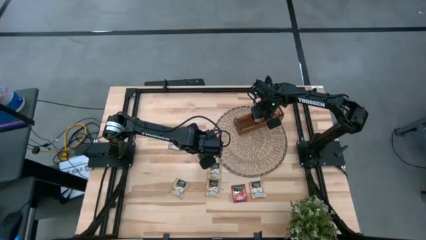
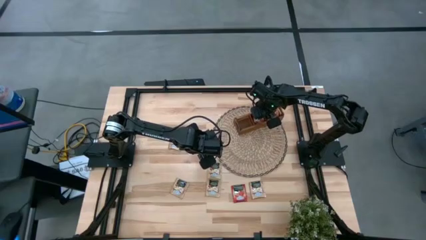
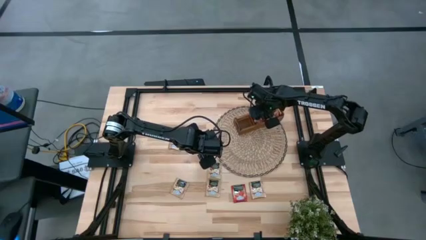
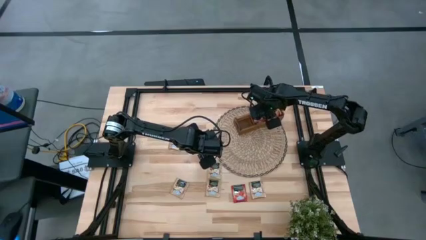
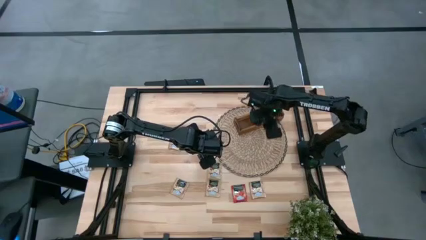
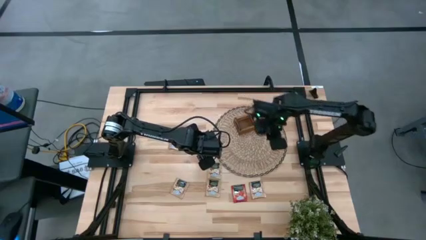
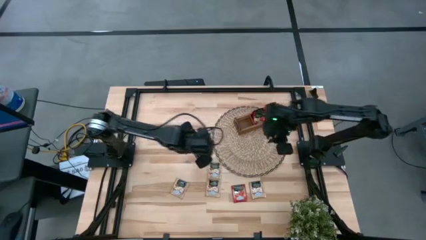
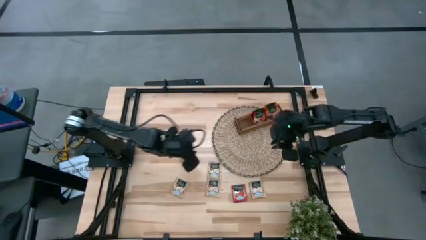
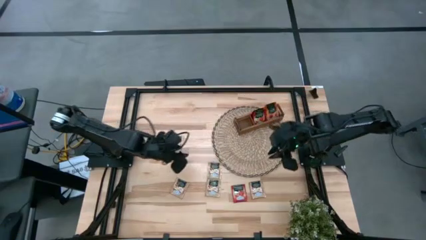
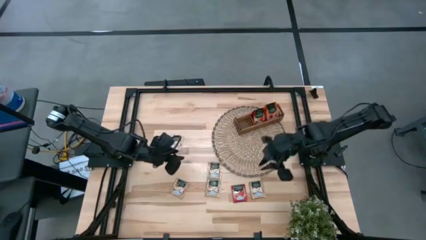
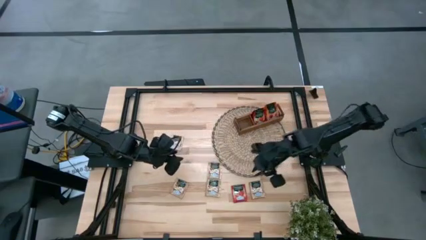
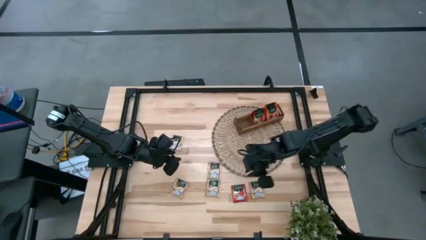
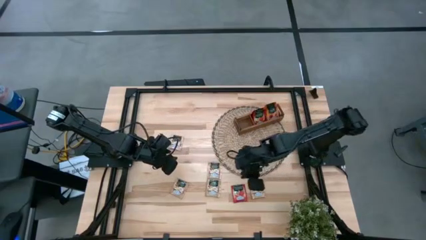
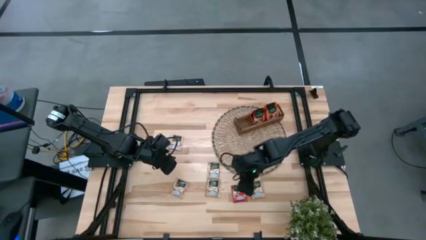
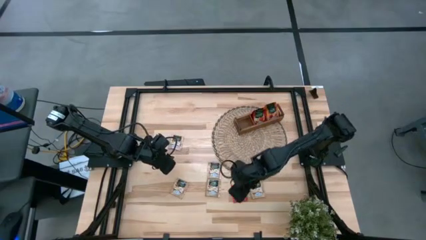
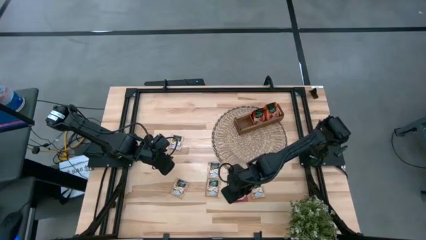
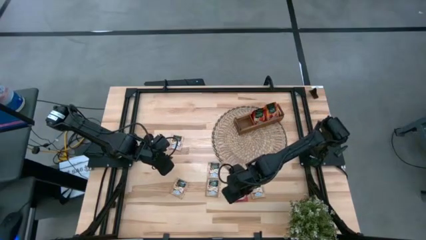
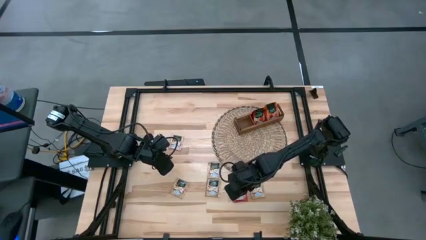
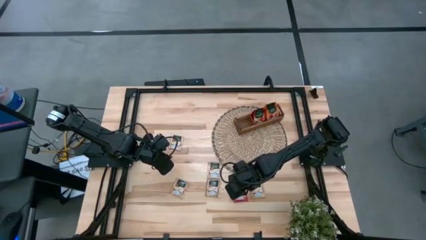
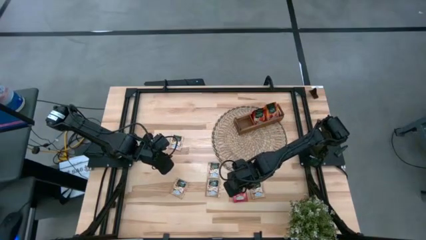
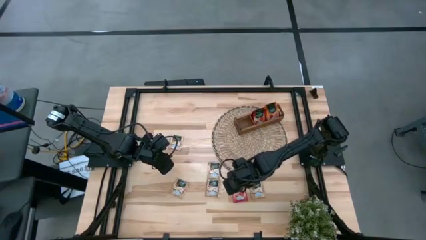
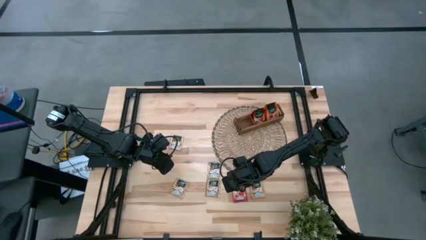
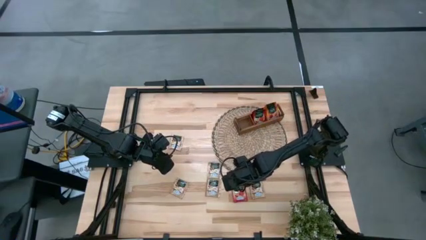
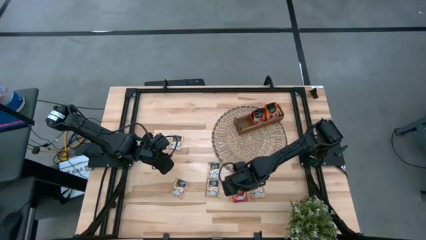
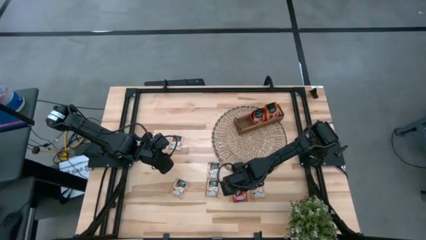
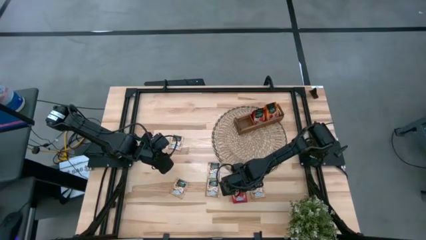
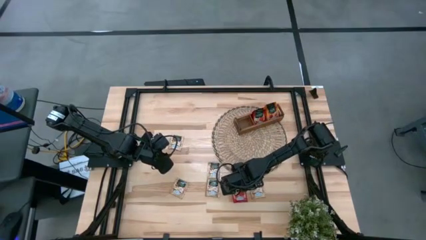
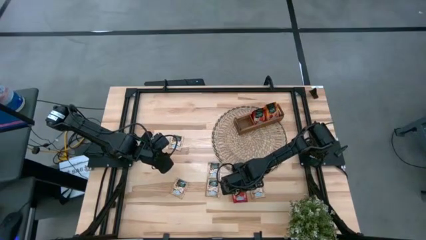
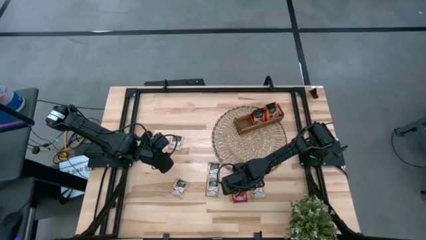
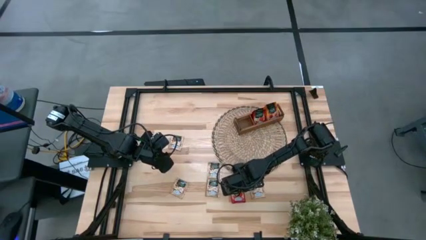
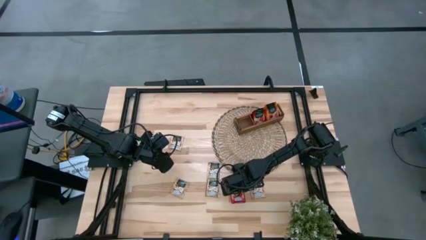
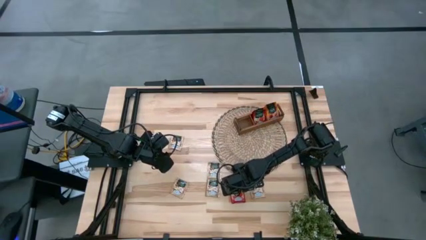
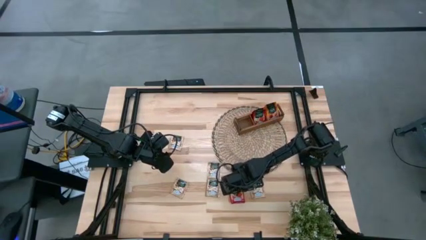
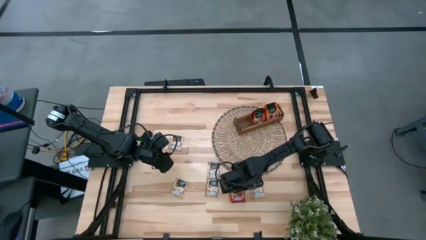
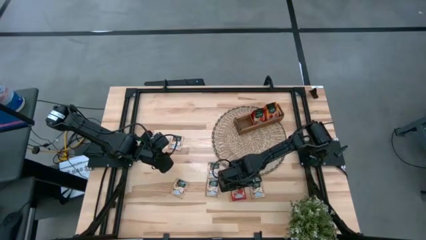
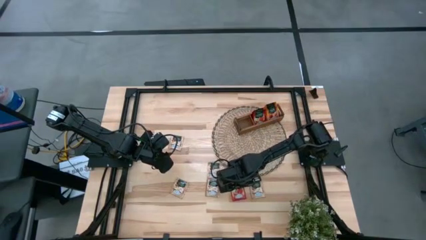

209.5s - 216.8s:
Task: Pick & Place Tea
Put the red tea pack into the middle compartment of the brown organizer

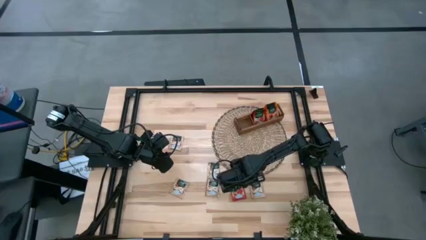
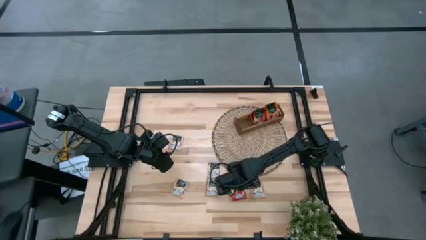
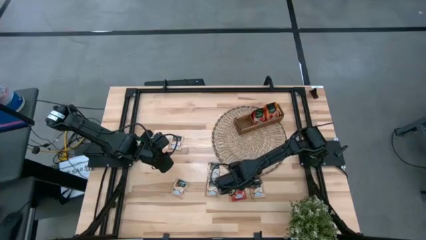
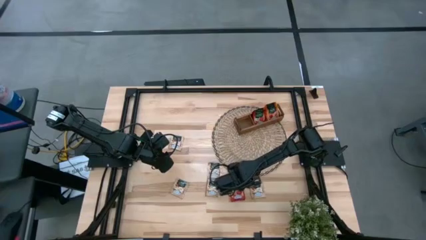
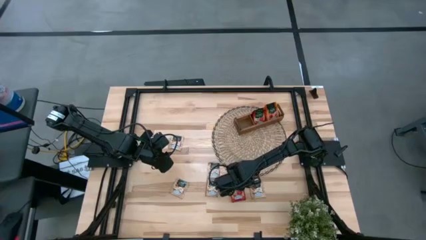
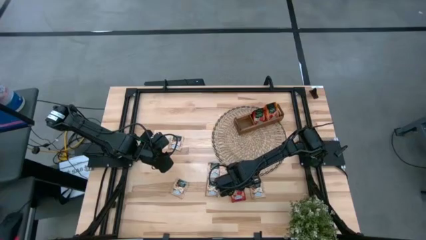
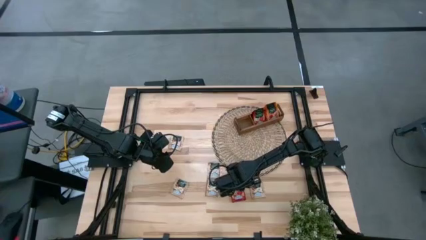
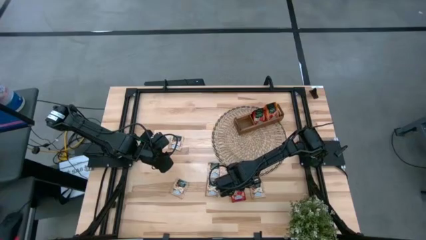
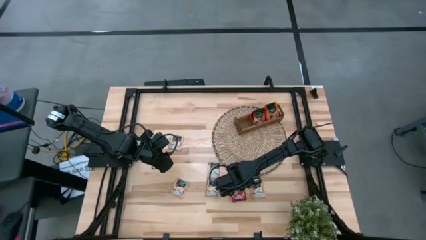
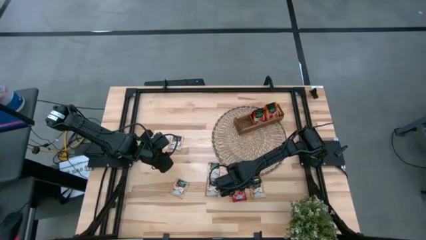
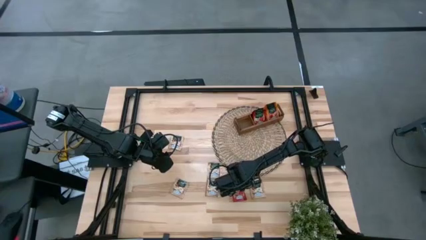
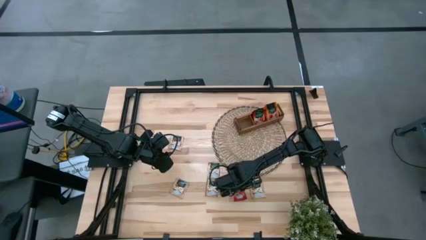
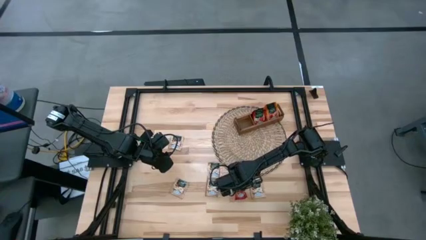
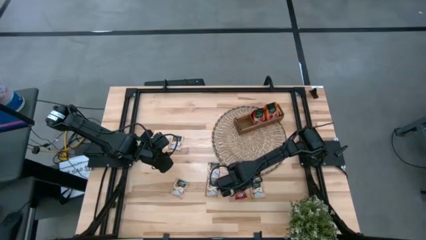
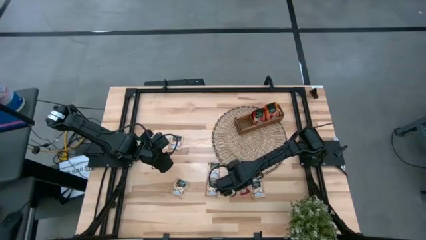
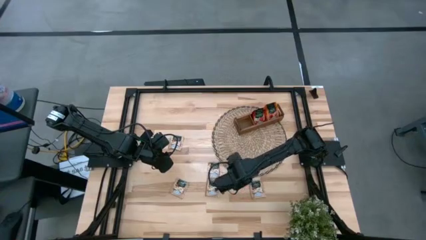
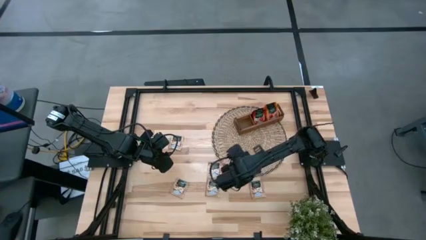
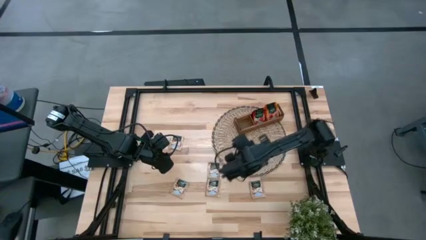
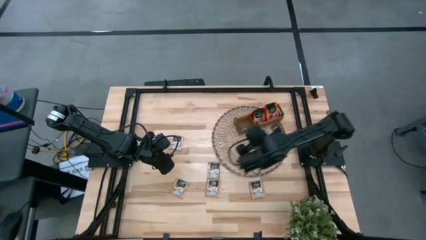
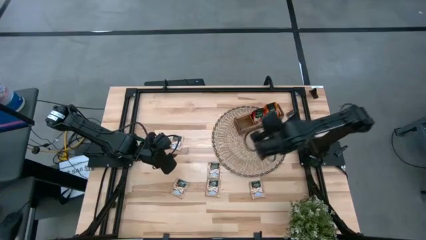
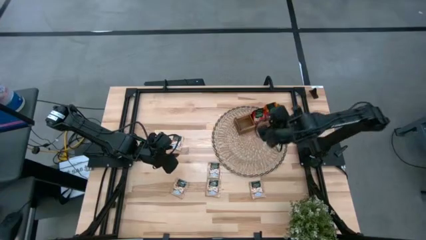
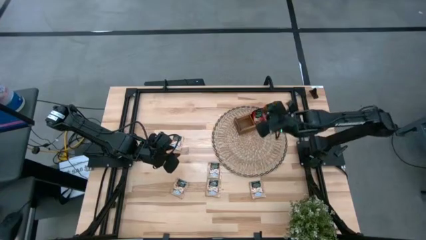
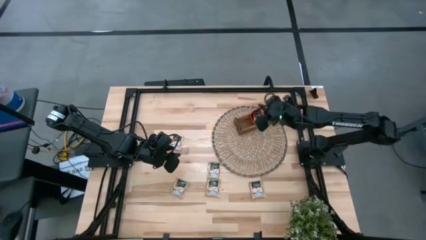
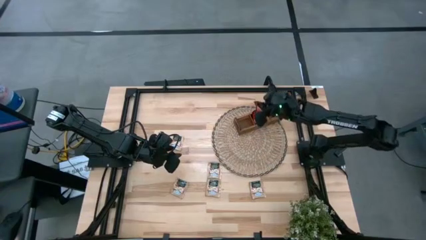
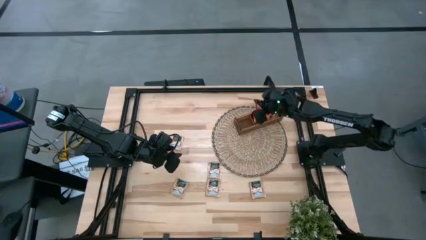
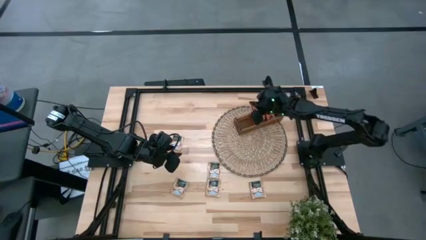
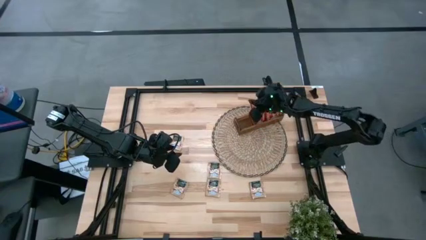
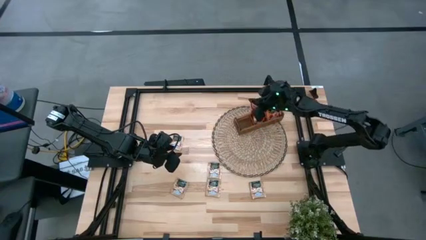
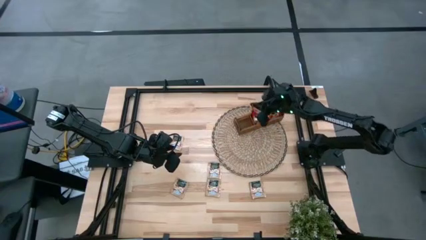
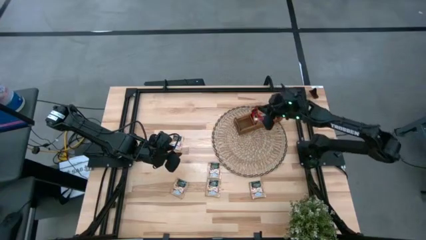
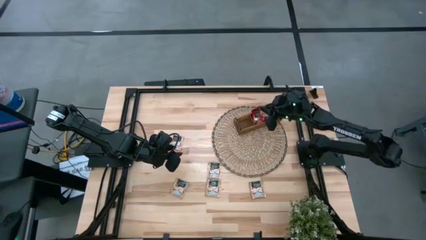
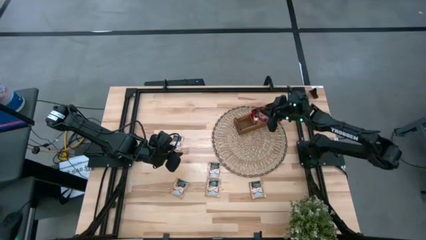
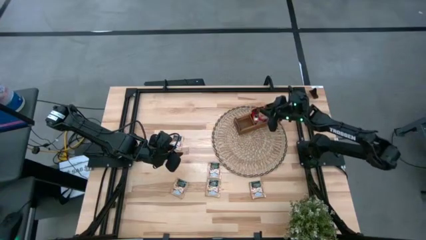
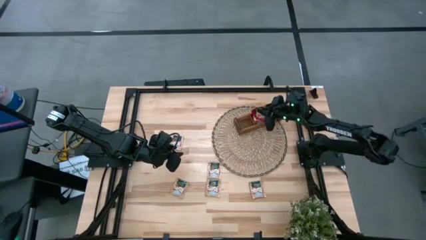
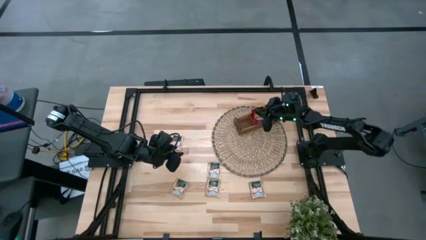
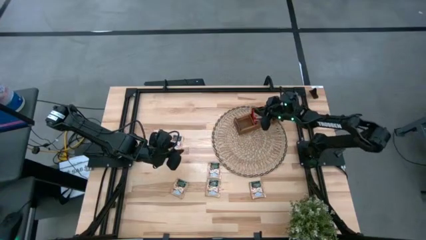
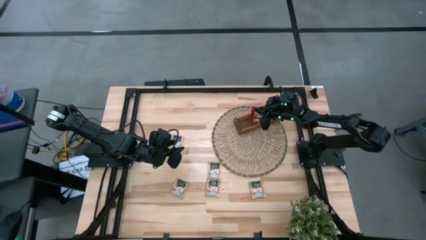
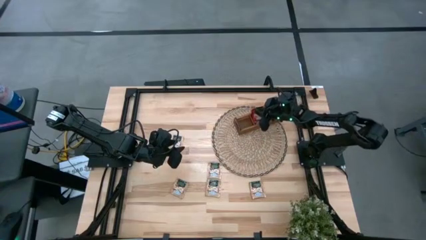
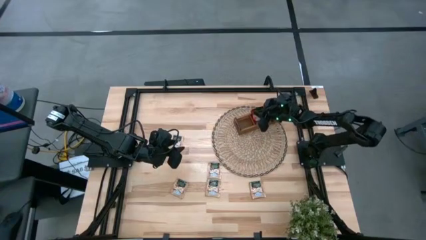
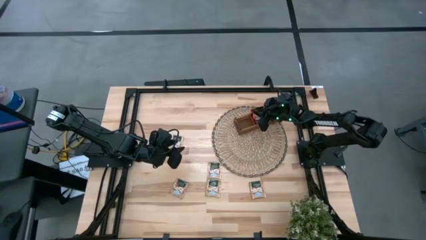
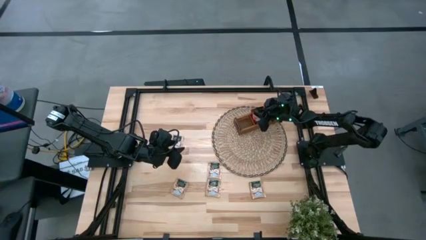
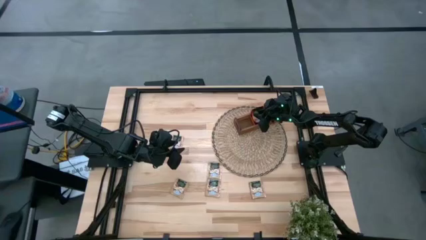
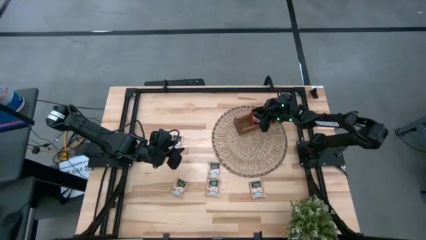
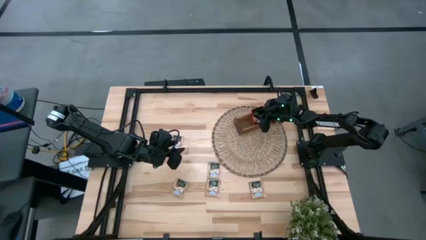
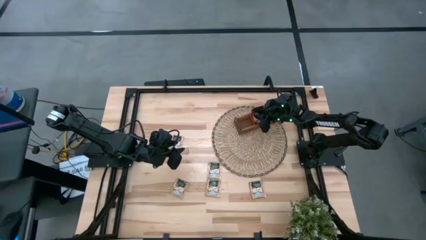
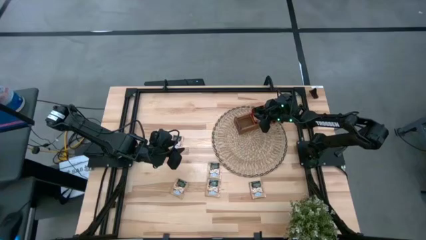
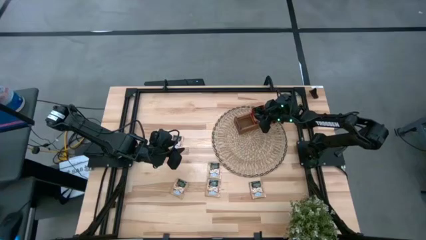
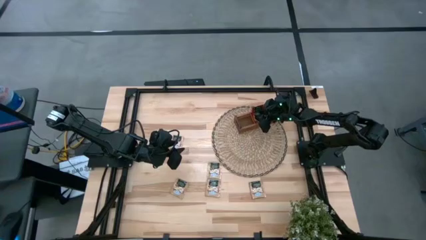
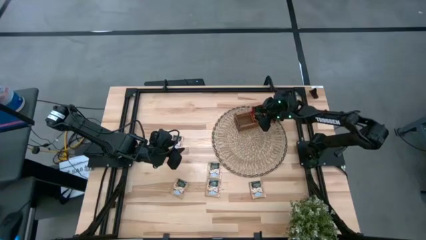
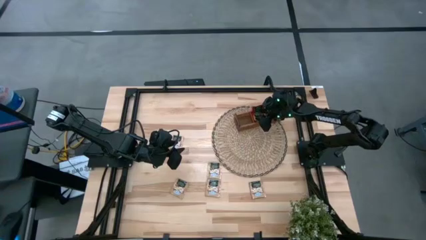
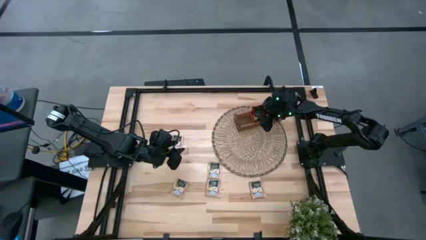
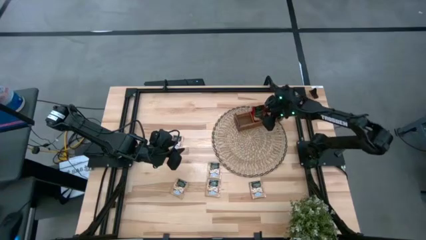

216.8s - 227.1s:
Put the red tea pack into the middle compartment of the brown organizer
